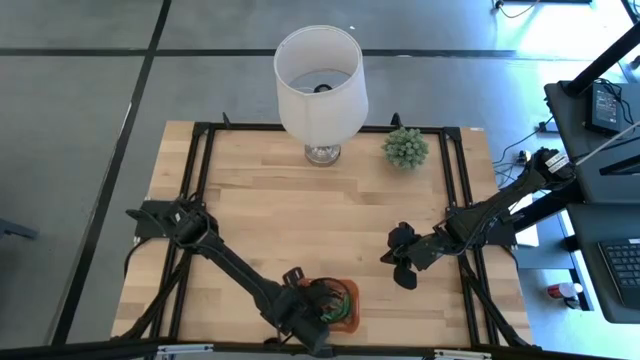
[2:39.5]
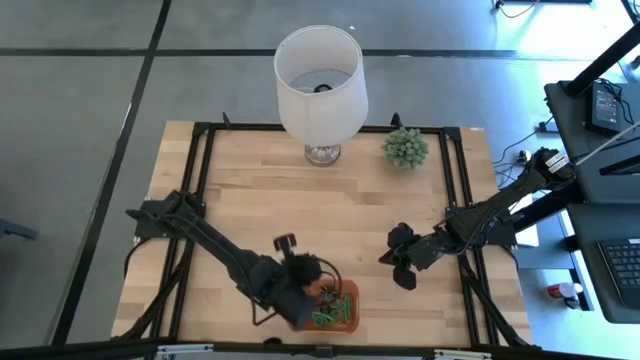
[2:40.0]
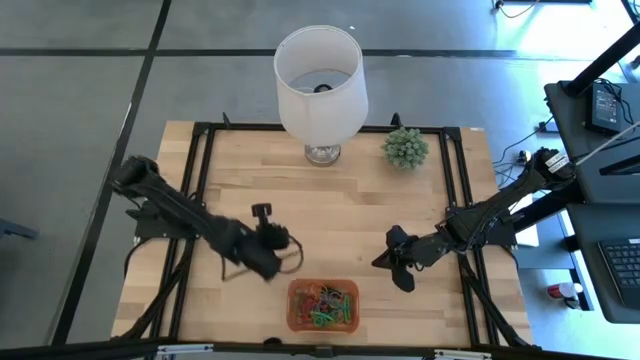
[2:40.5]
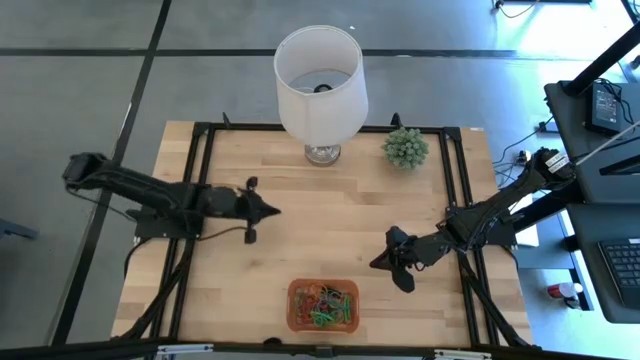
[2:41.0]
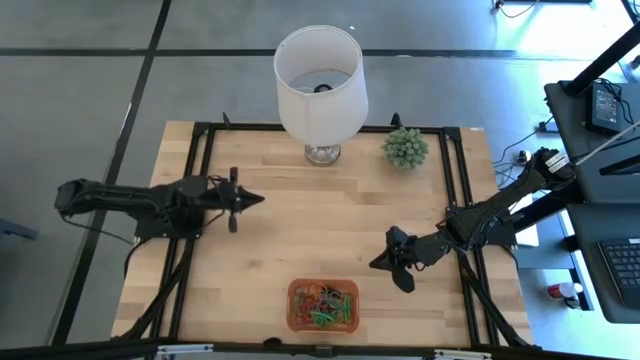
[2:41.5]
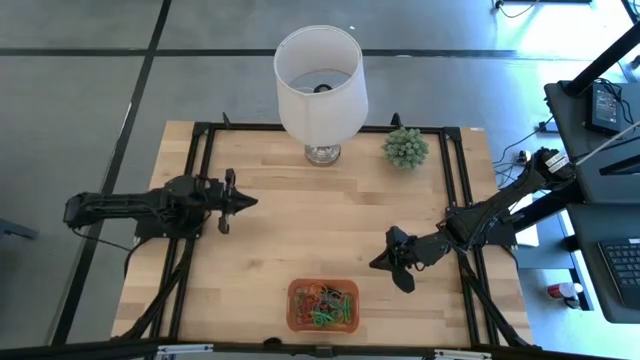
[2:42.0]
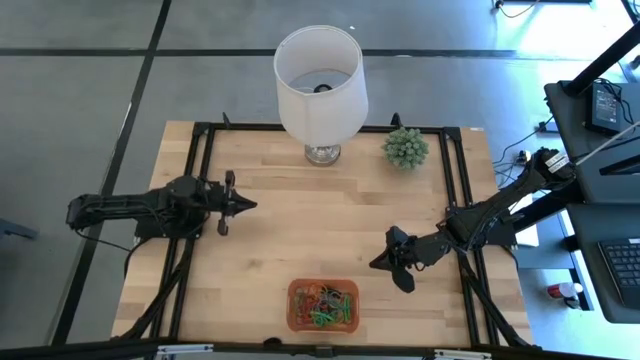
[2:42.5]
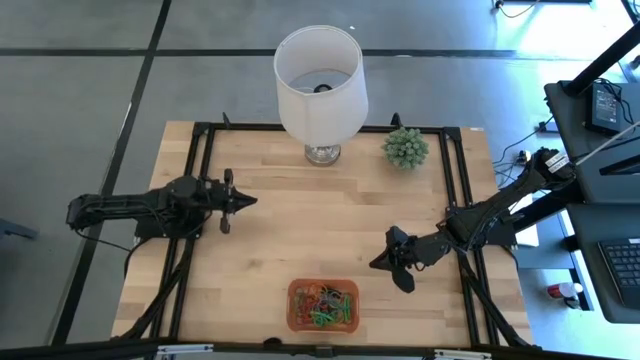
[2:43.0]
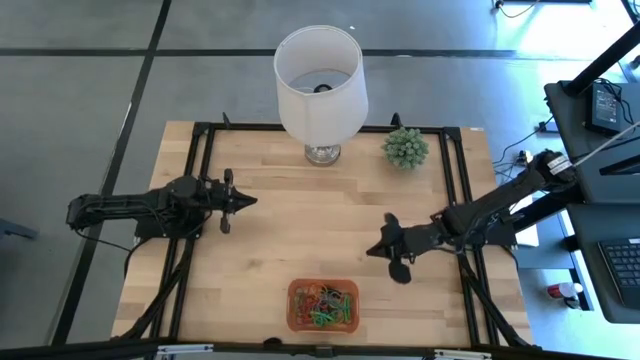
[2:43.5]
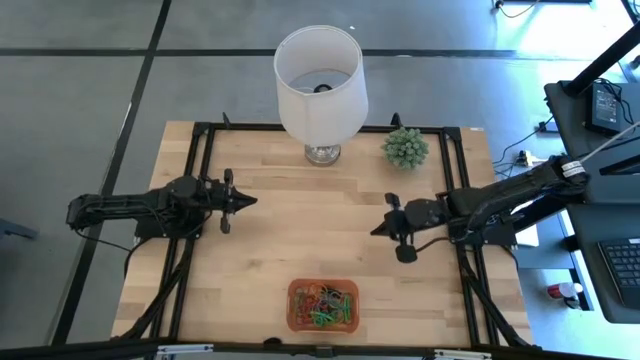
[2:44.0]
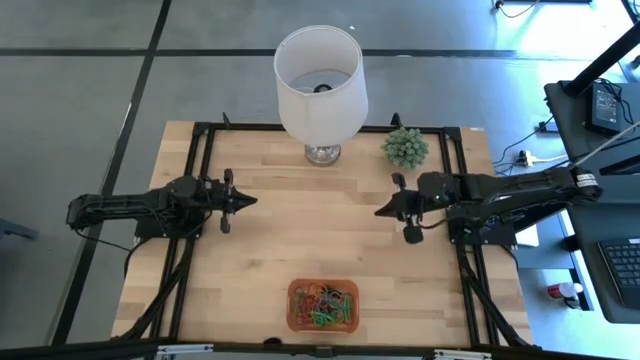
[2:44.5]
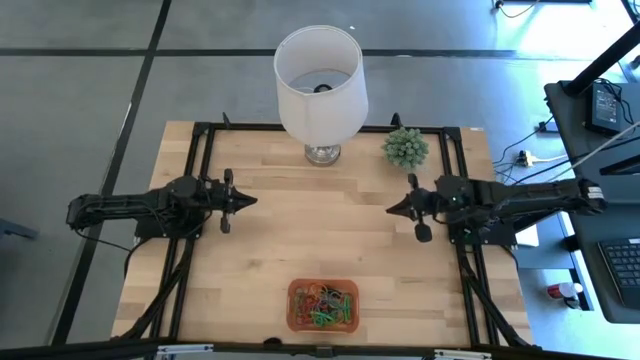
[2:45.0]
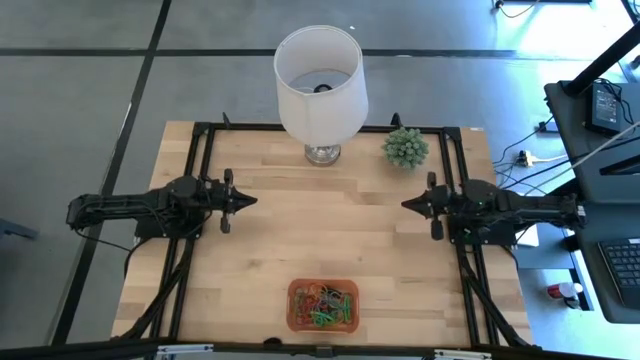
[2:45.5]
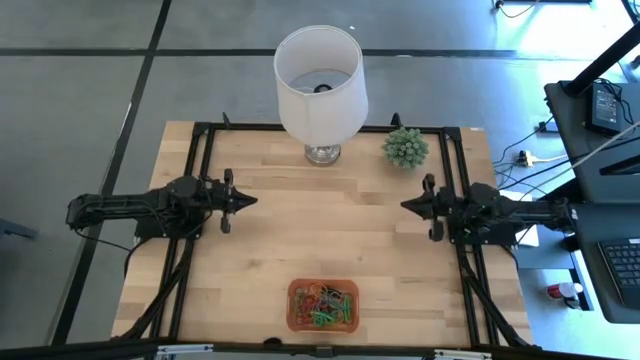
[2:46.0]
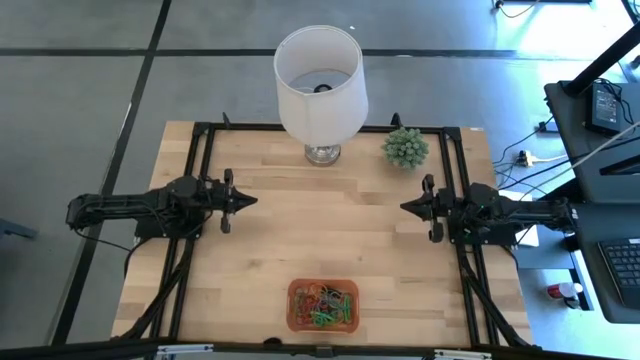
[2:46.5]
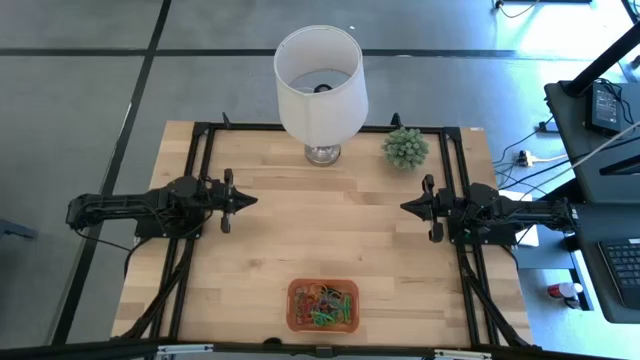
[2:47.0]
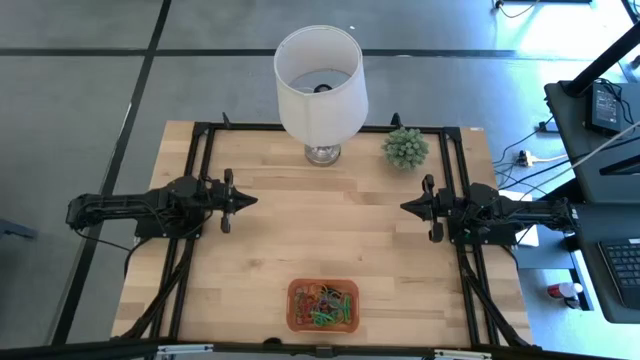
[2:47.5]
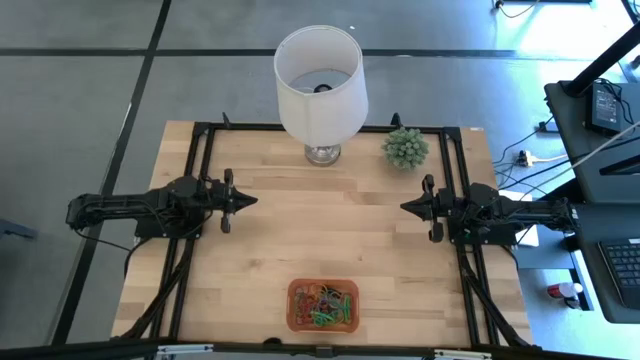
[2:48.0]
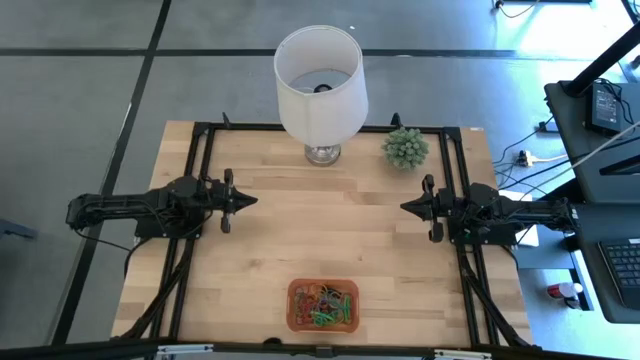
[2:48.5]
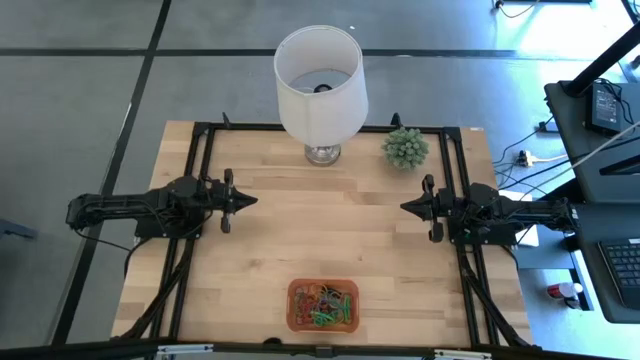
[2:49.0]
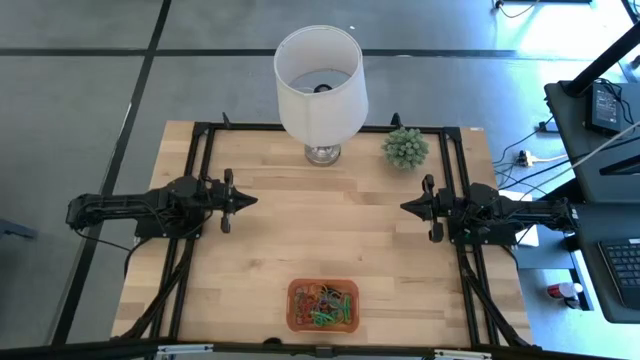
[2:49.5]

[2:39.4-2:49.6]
Task: Pick and place rubber bands into bin
Return to Home Position

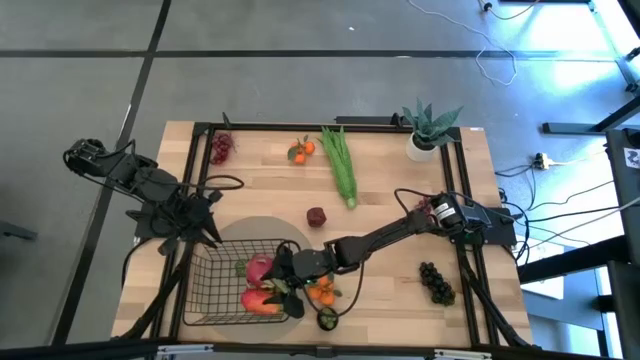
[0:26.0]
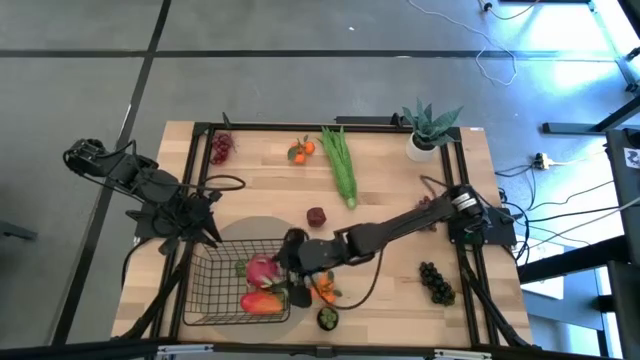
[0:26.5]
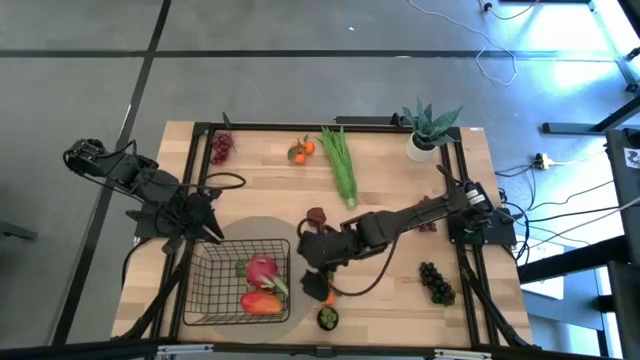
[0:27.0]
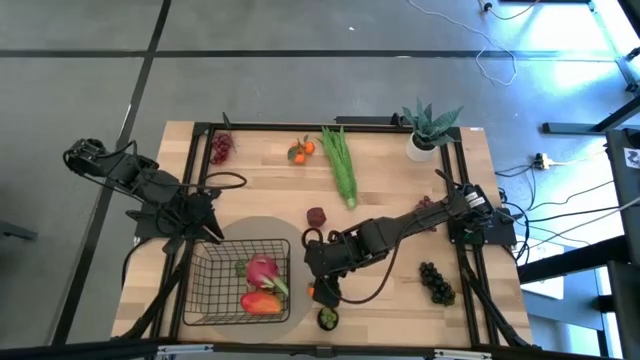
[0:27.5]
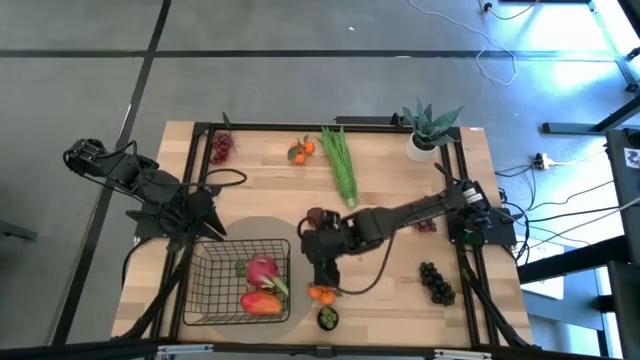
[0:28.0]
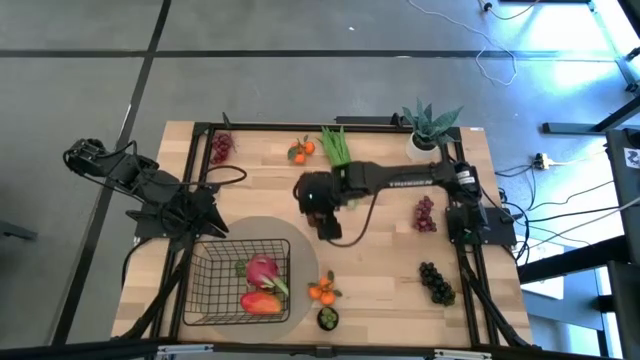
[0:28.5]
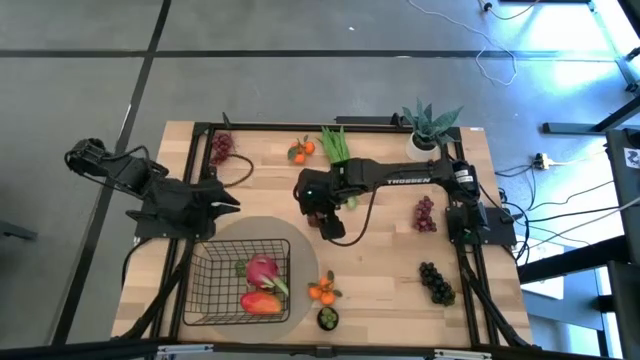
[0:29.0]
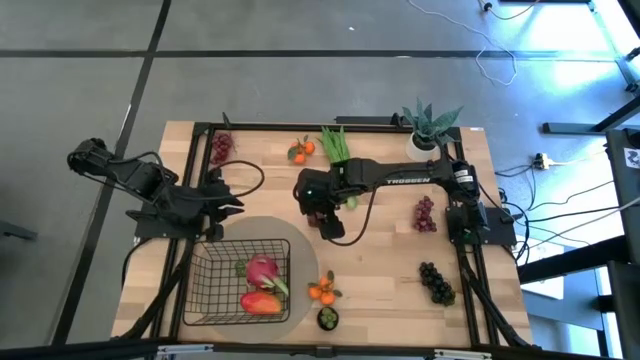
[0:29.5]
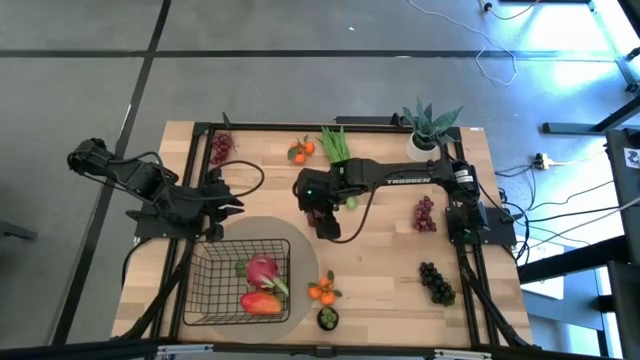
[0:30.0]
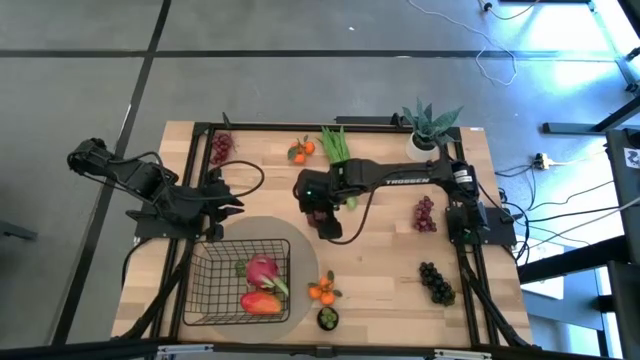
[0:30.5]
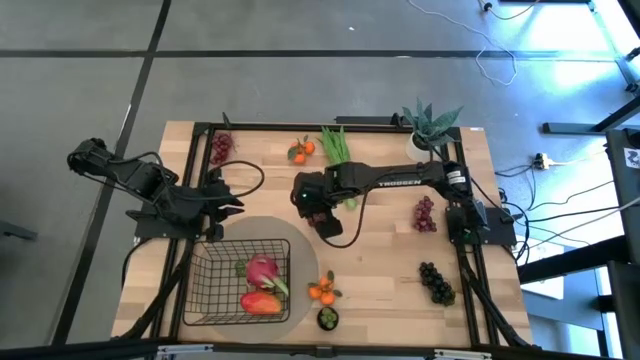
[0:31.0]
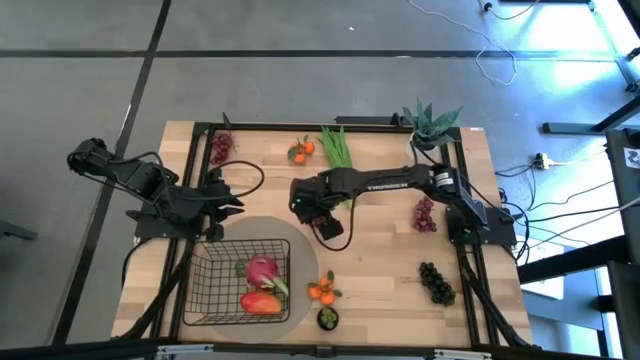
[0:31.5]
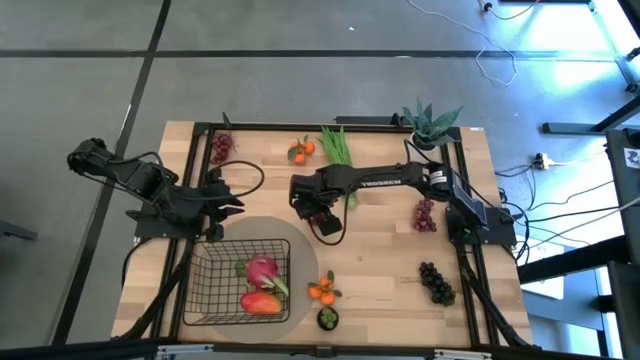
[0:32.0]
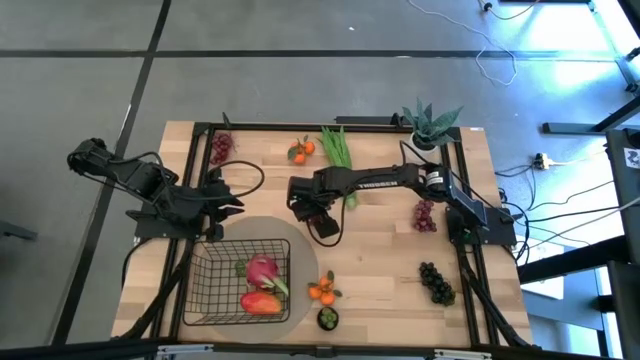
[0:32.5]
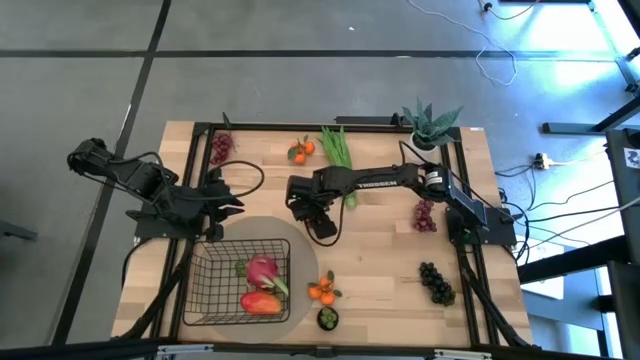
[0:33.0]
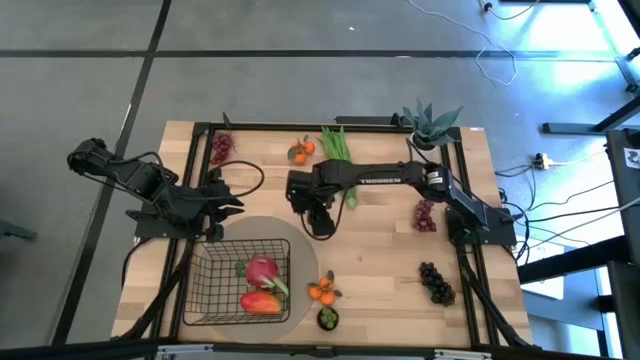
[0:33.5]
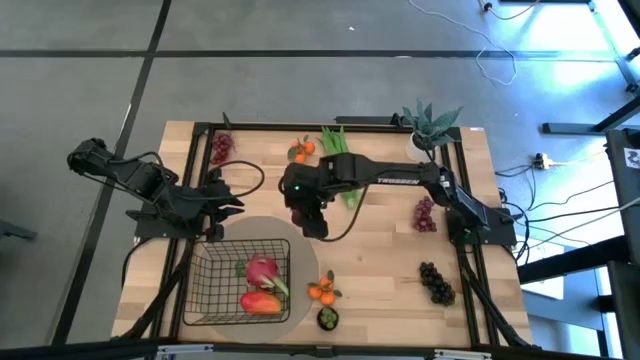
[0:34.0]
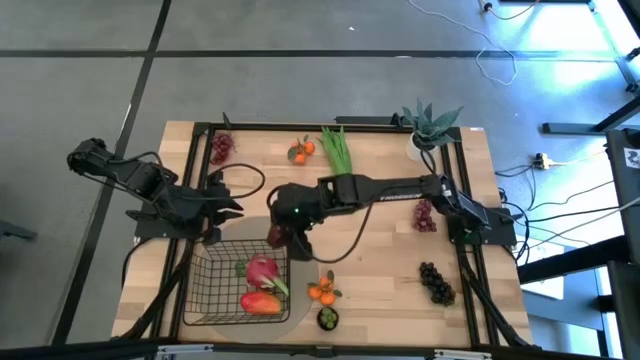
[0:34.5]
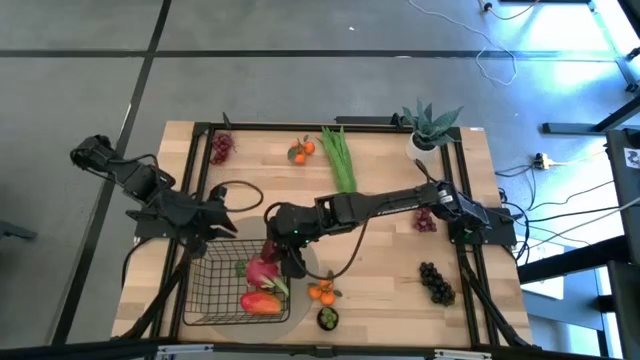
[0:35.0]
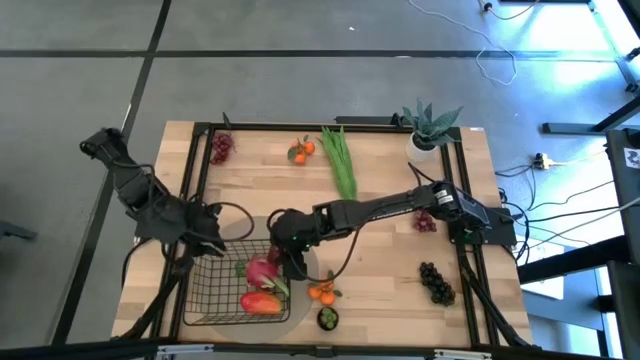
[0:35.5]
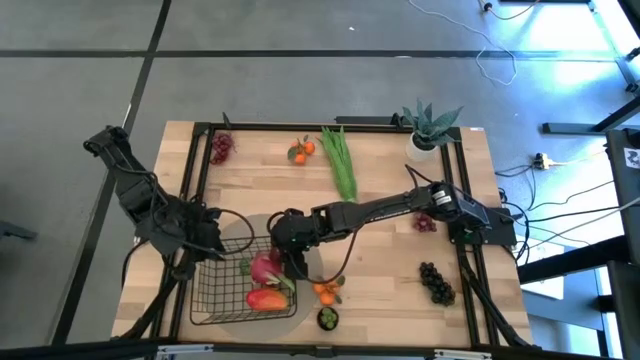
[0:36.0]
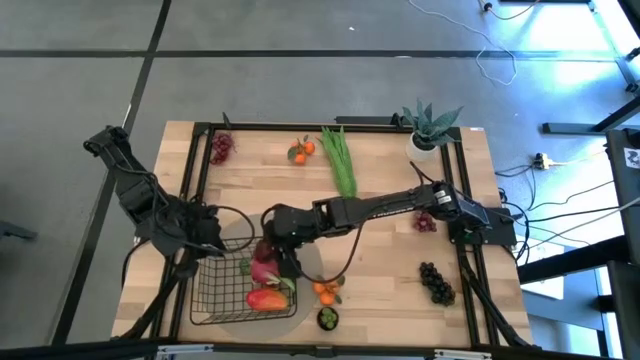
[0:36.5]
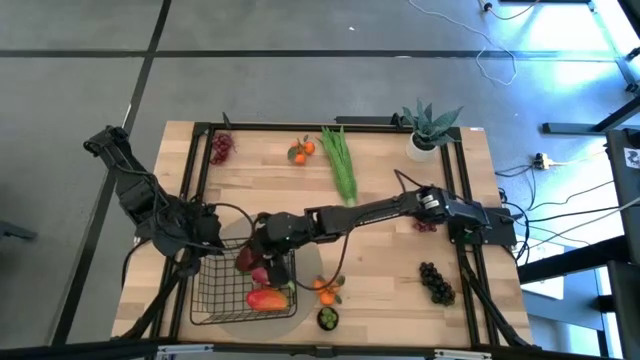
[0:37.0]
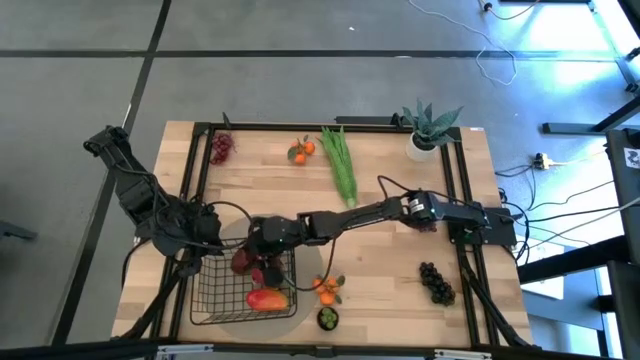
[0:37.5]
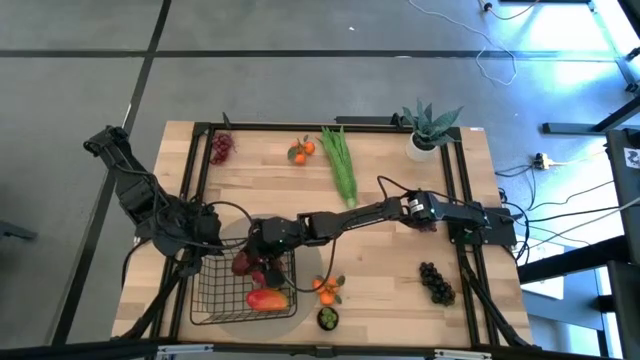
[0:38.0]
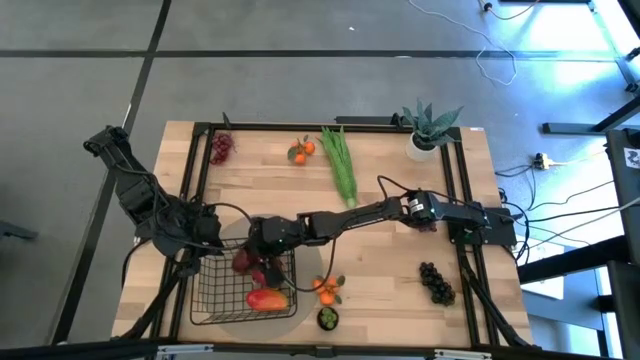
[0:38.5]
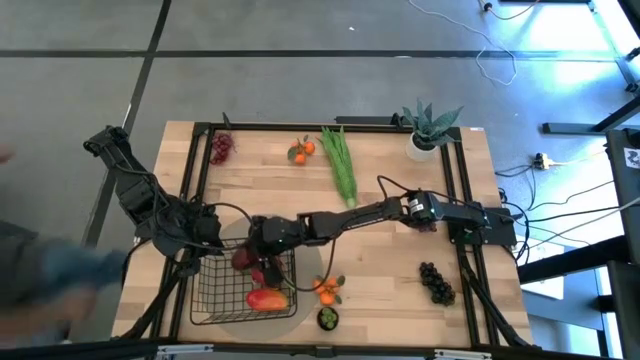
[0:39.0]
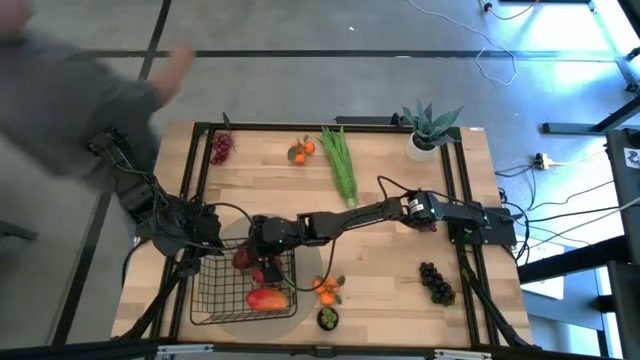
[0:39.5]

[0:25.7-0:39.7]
Task: Build produce basket
Put the red apple into the black wire basket
